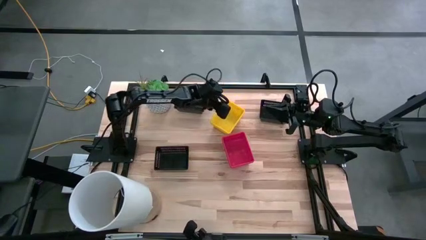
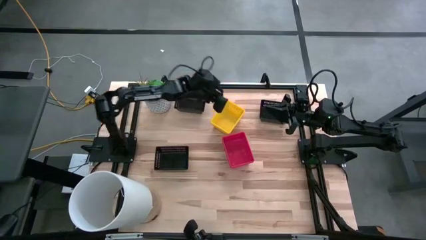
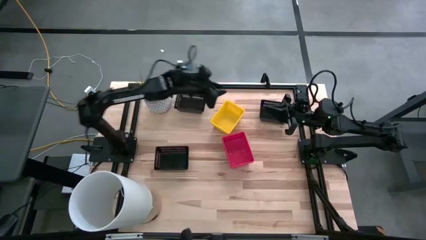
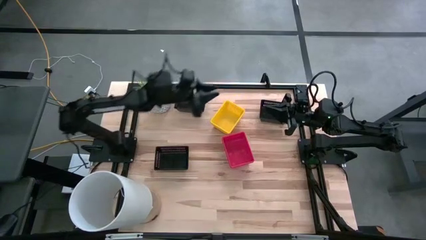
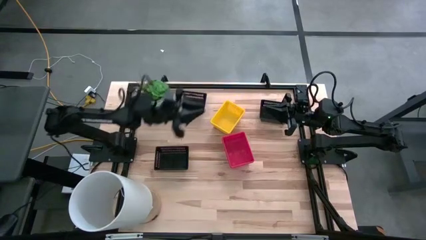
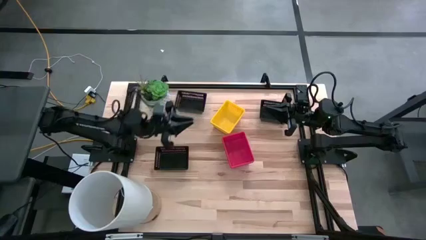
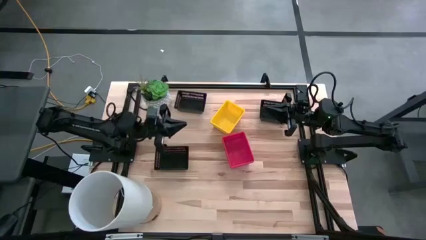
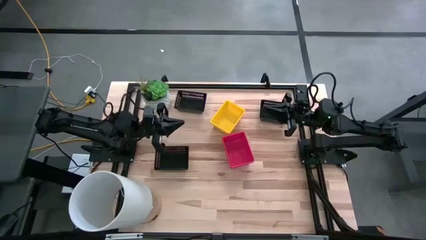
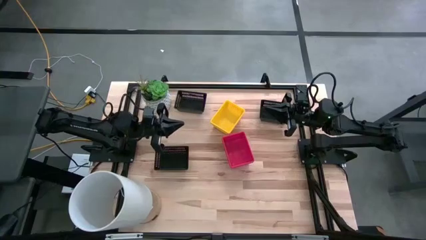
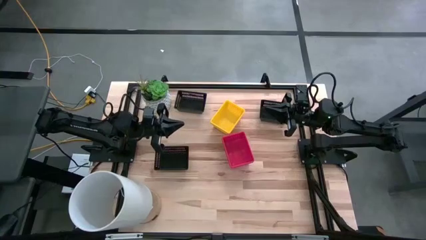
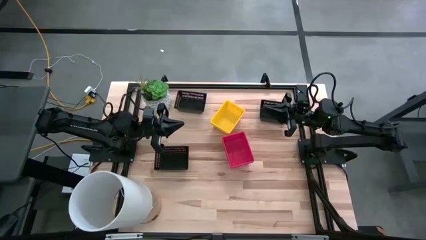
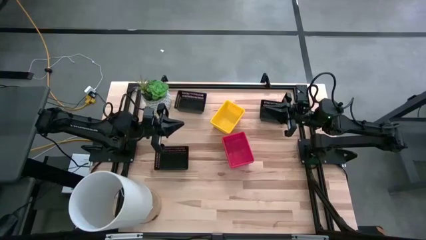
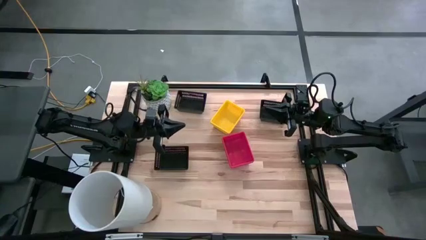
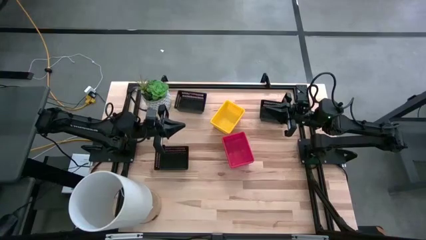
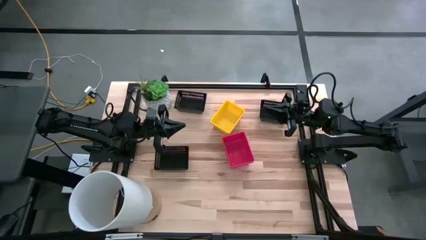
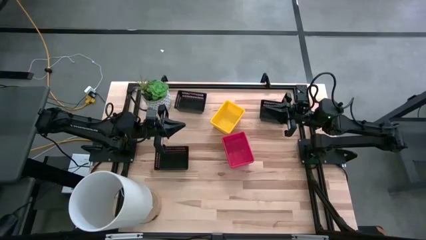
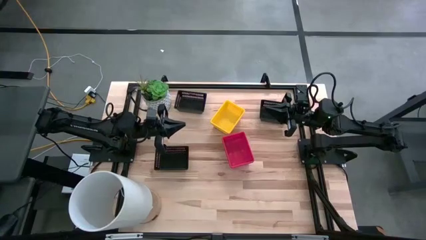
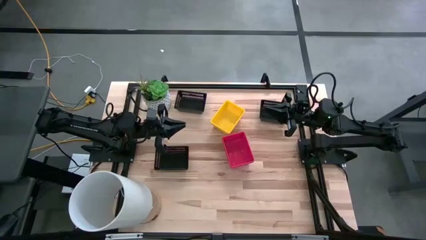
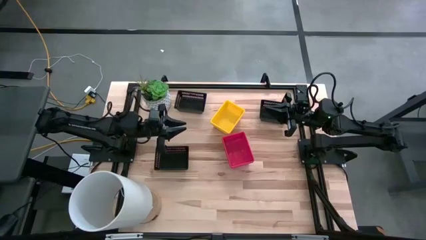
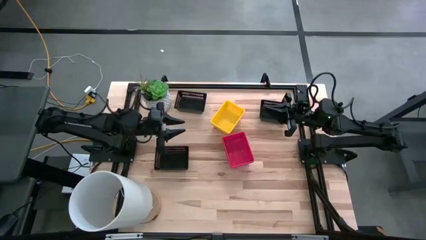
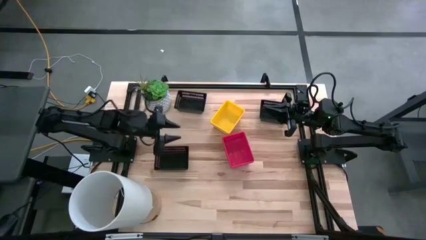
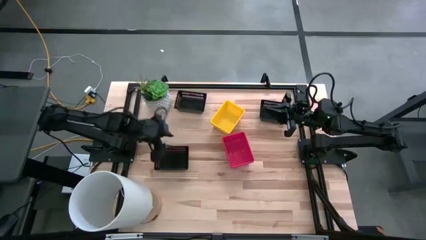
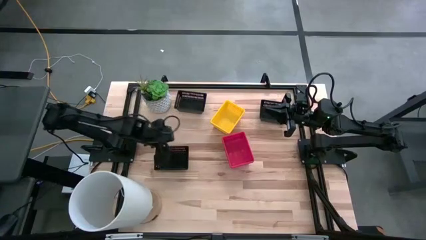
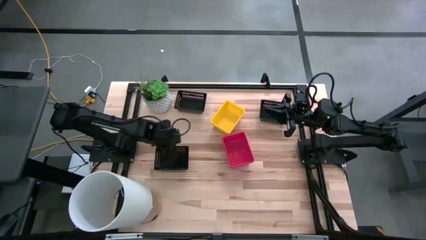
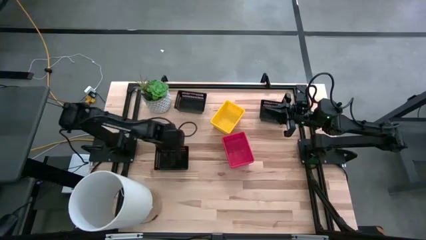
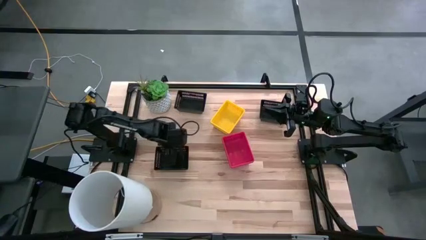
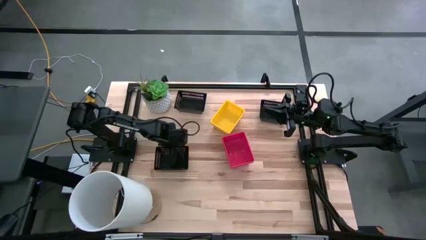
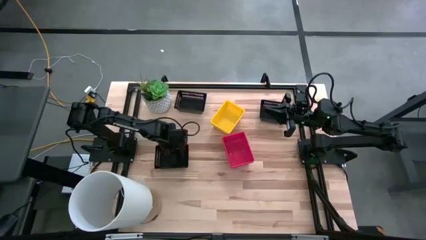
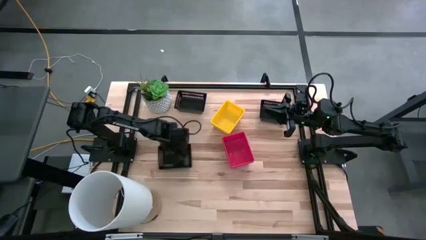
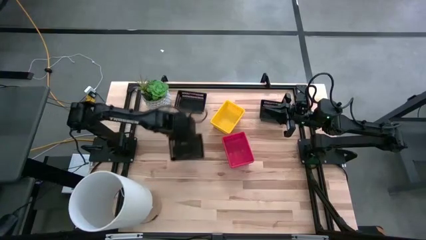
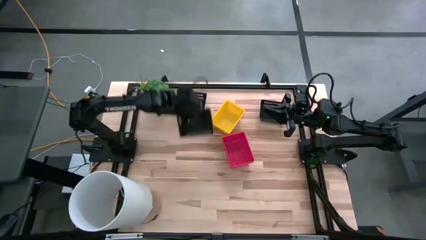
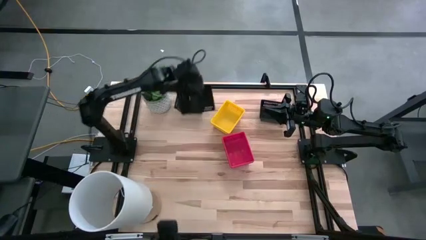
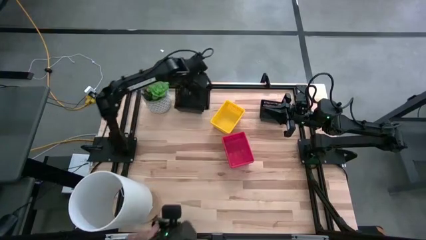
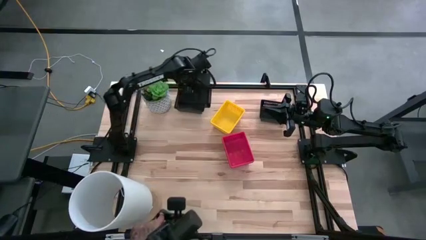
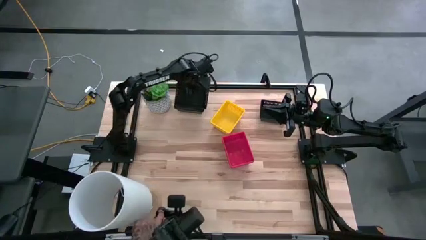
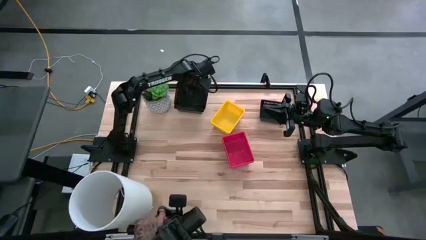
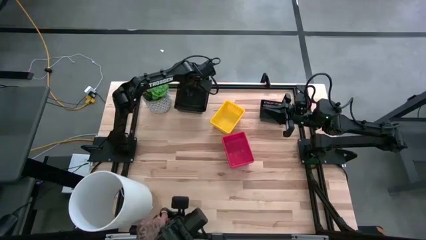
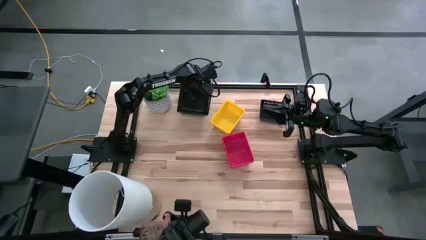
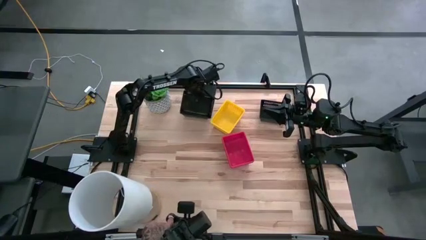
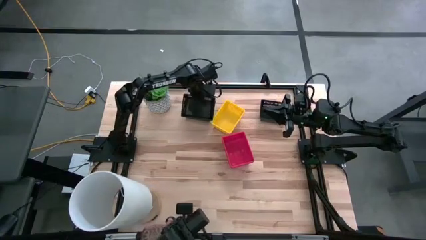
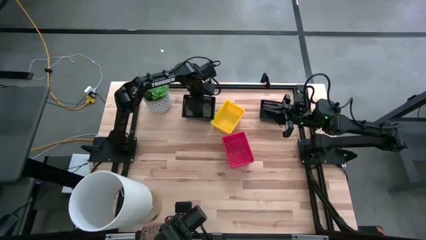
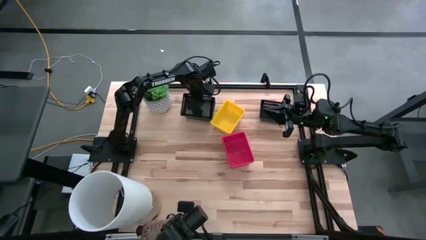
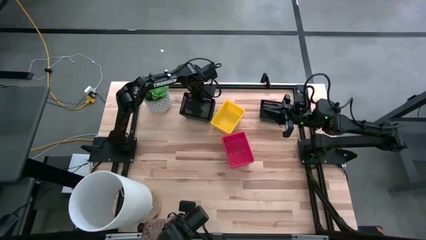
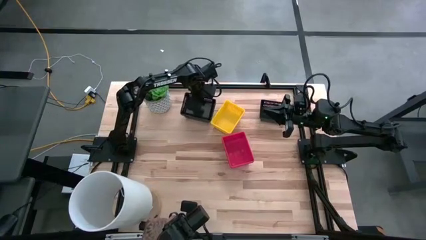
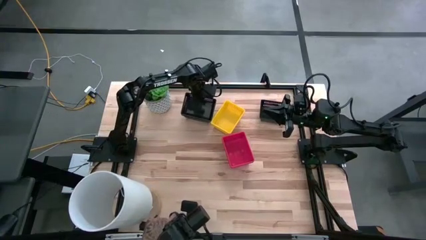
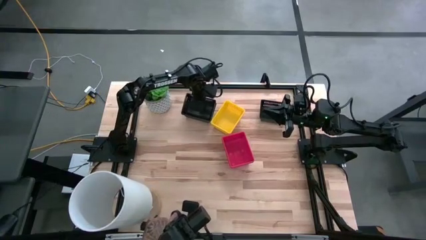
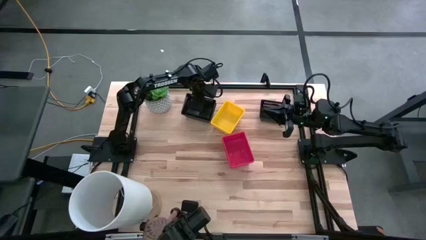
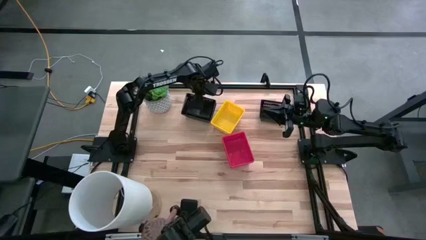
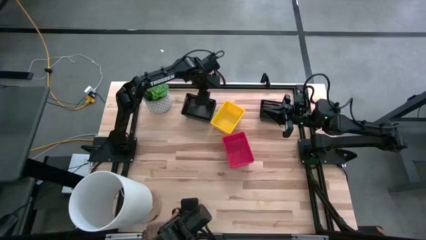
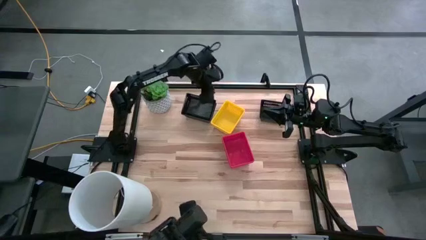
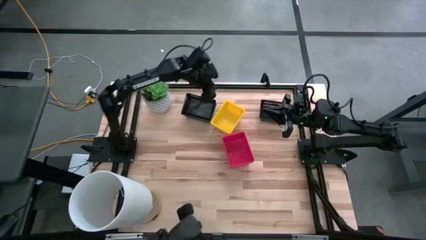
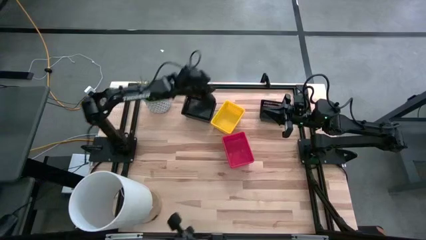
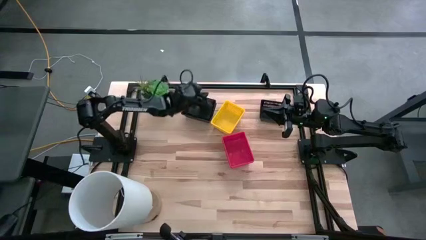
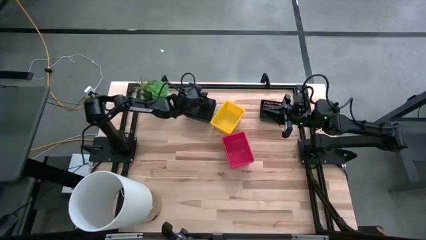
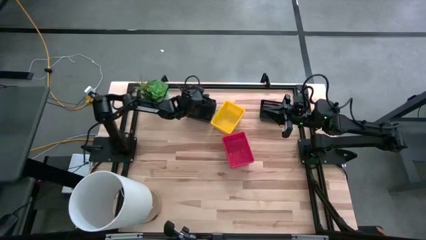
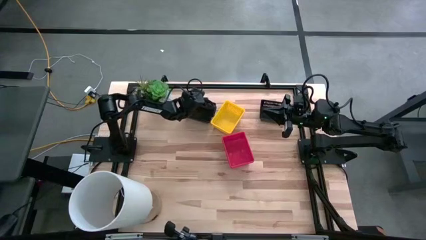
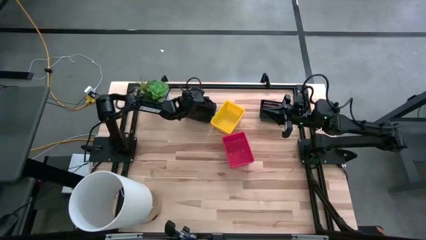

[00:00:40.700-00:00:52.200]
Stack the bottom black bin on the black bin

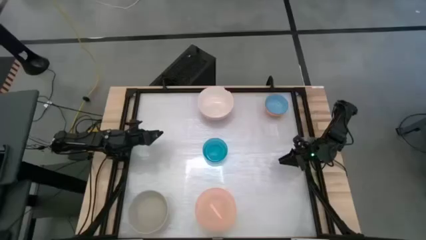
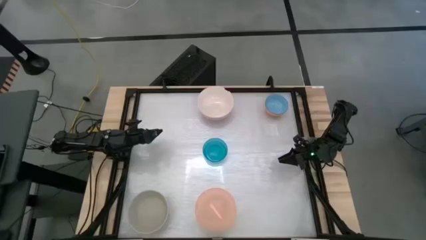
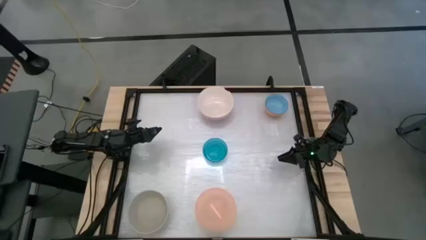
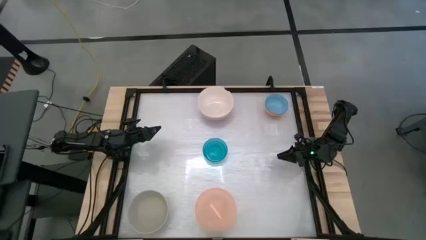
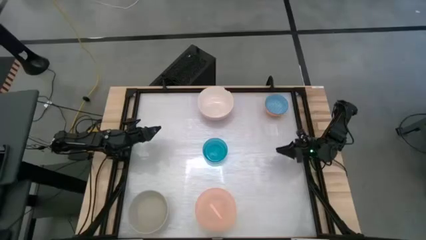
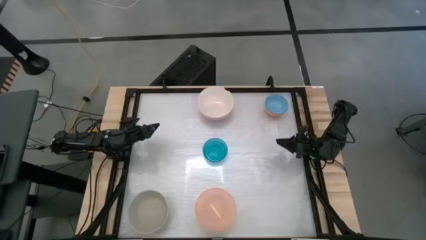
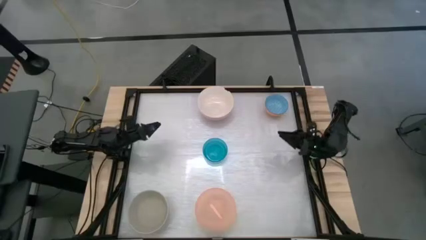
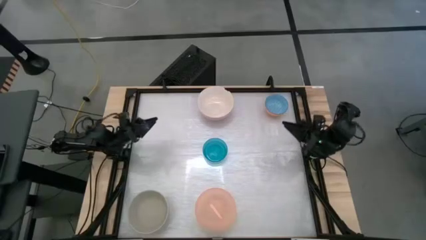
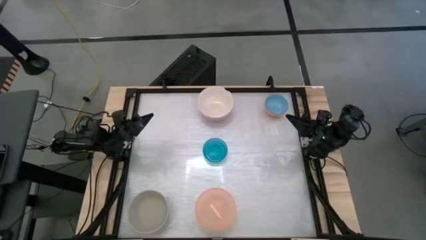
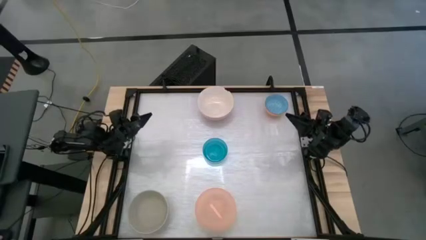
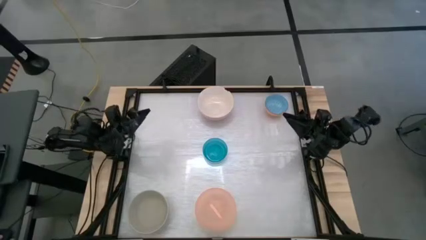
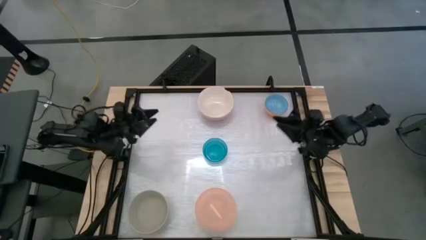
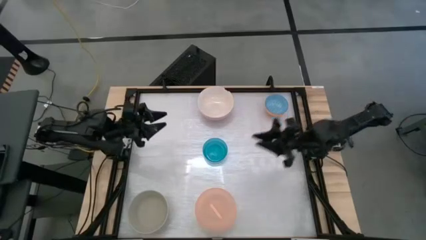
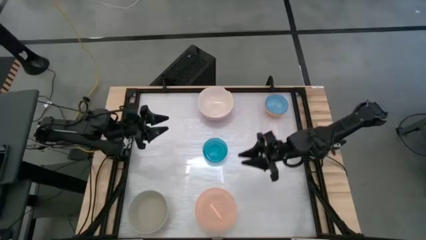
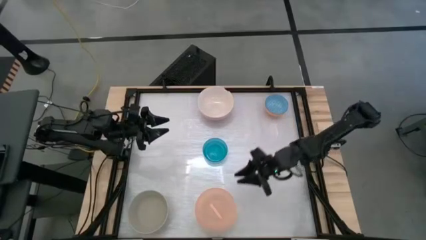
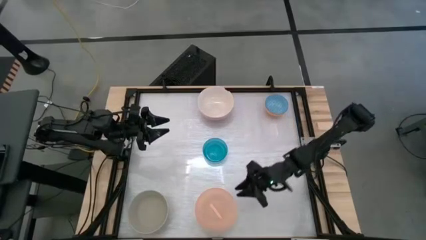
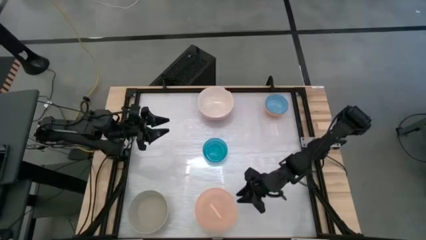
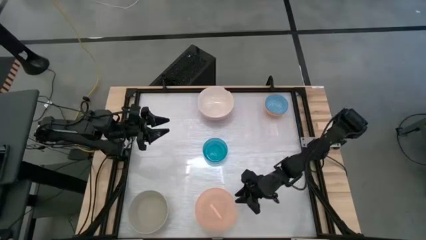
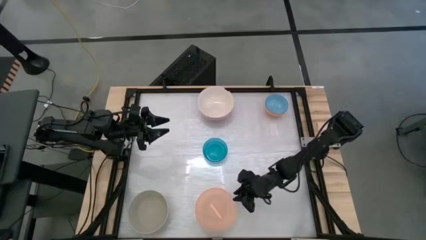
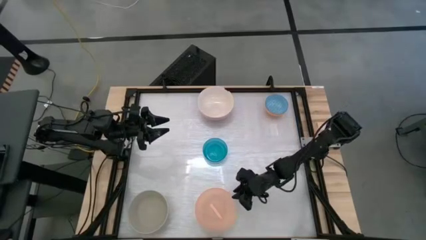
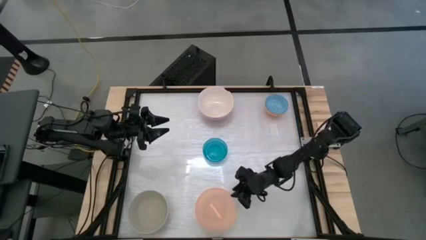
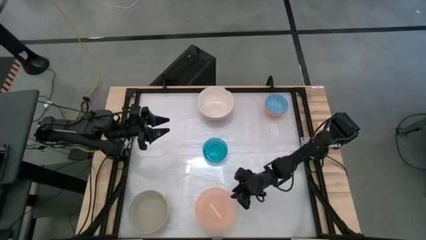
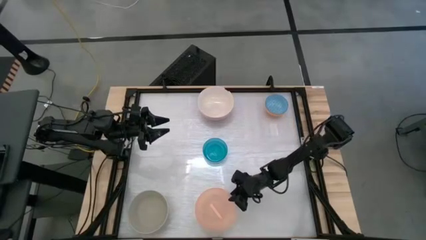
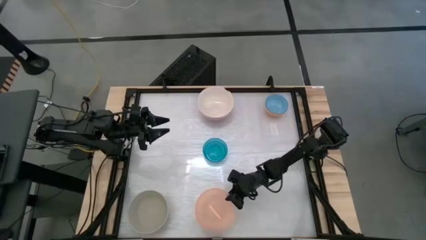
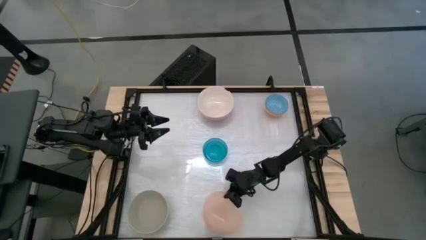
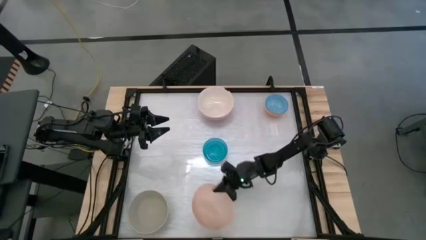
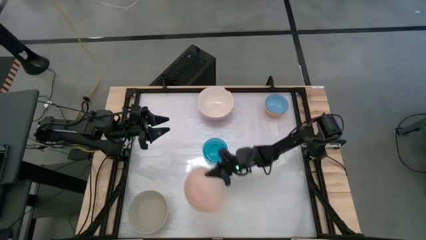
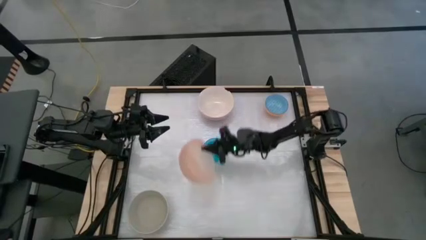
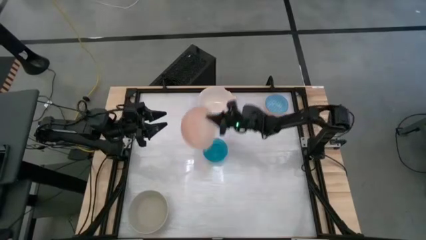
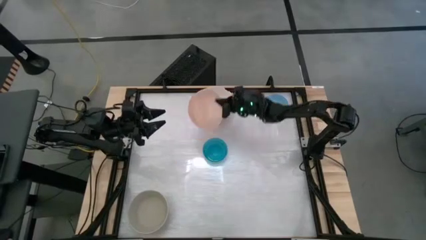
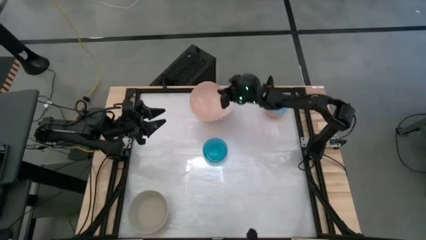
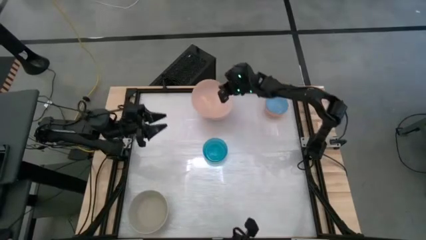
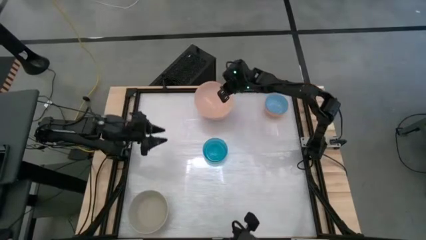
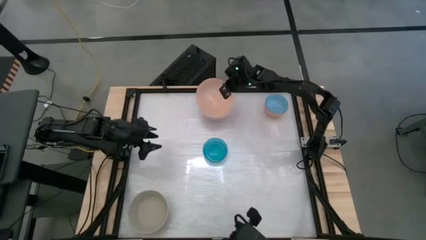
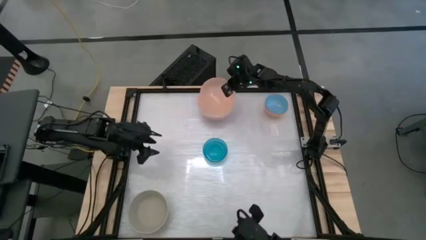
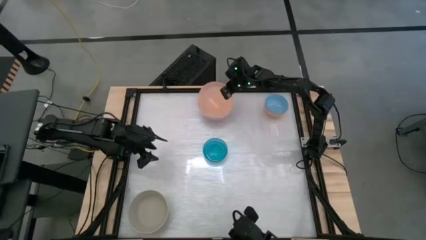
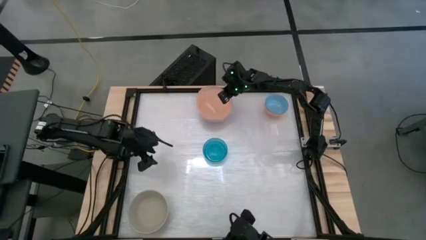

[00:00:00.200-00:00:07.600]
Stack the pink bowl on top of the white bowl
